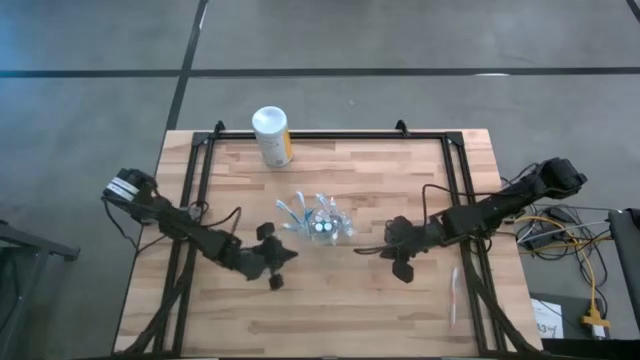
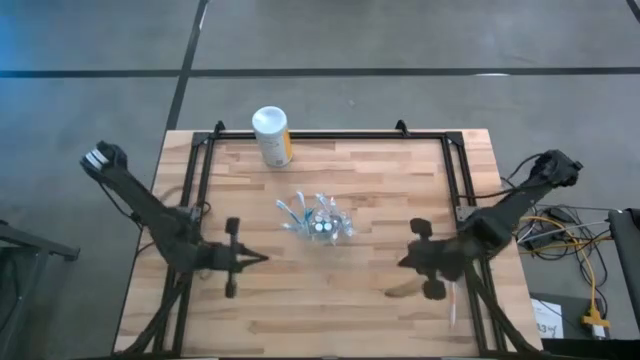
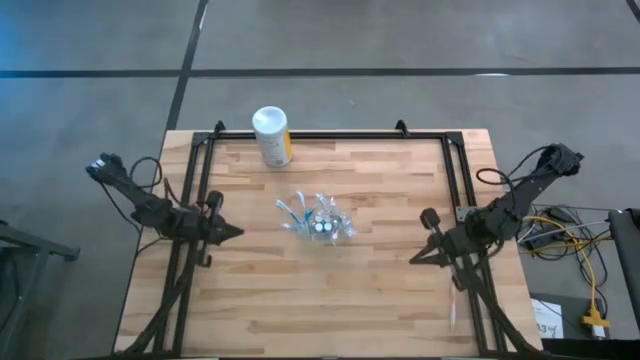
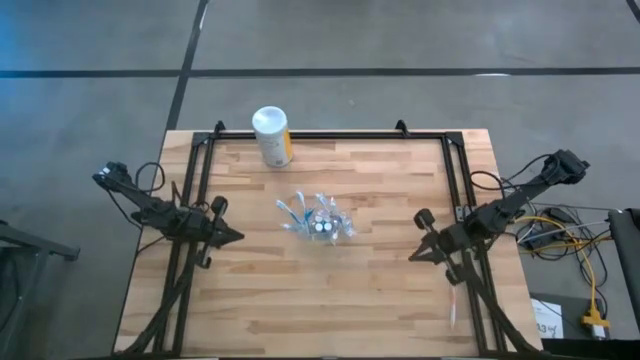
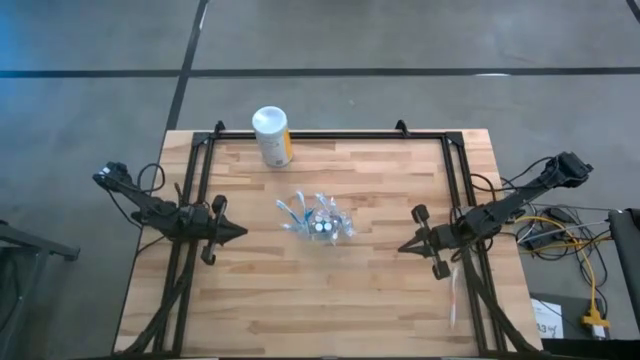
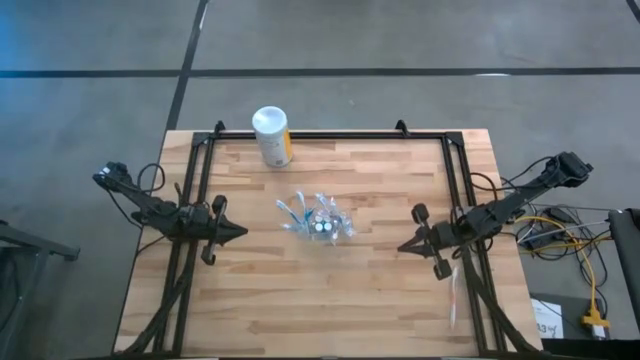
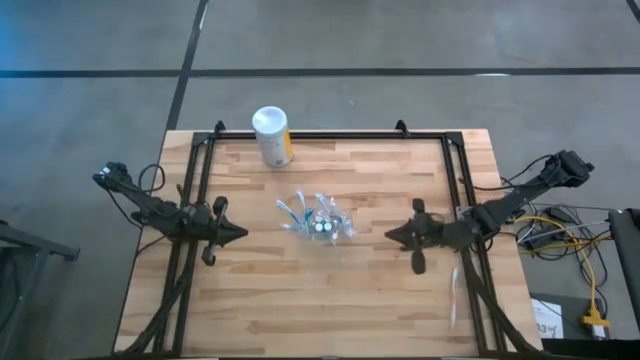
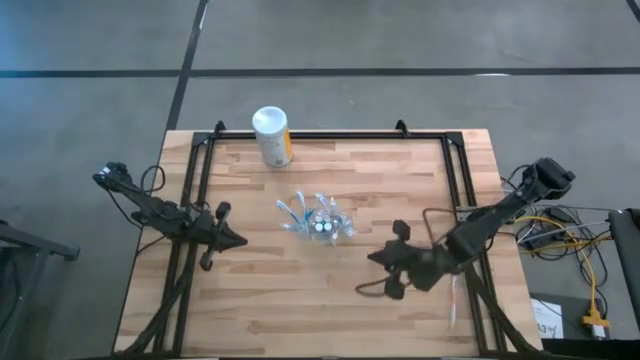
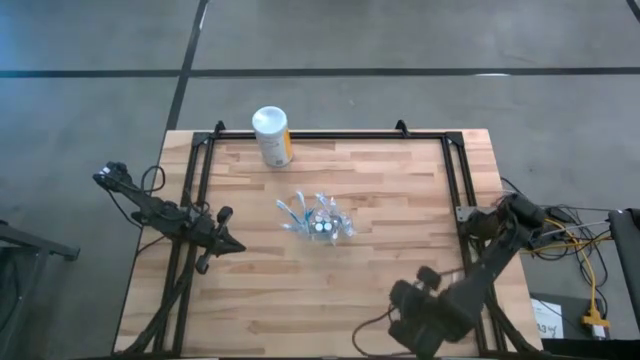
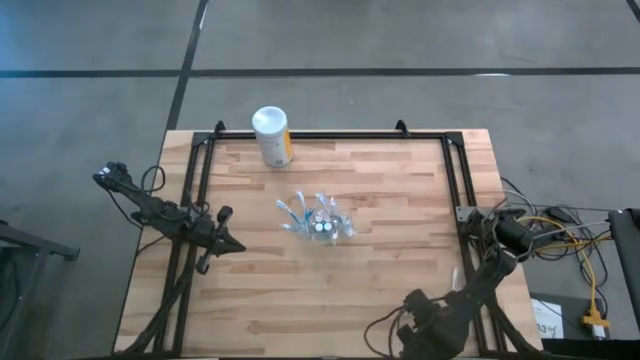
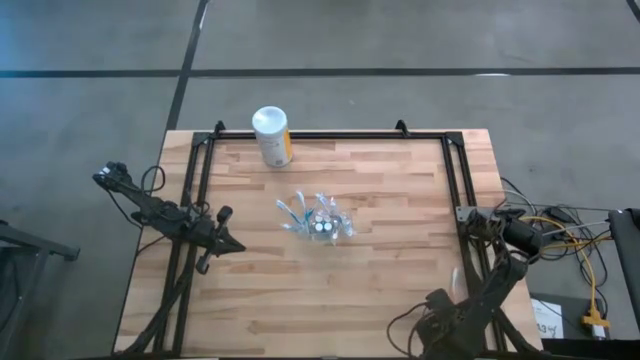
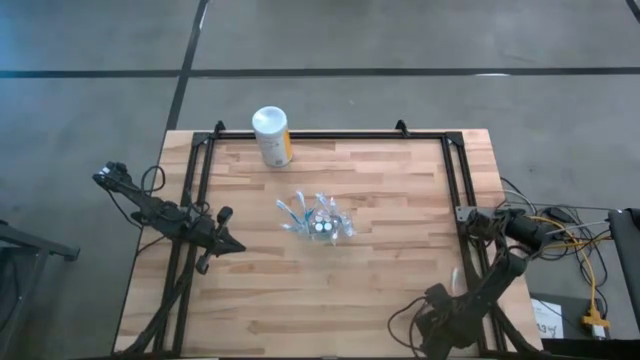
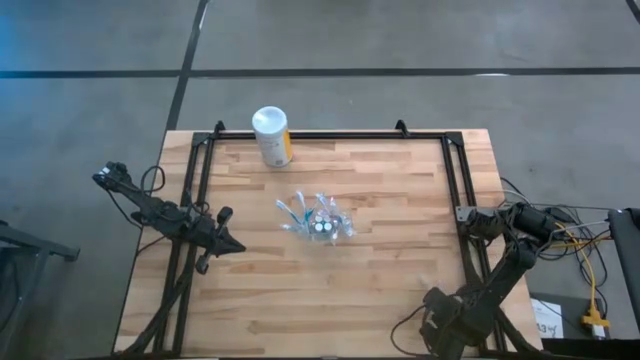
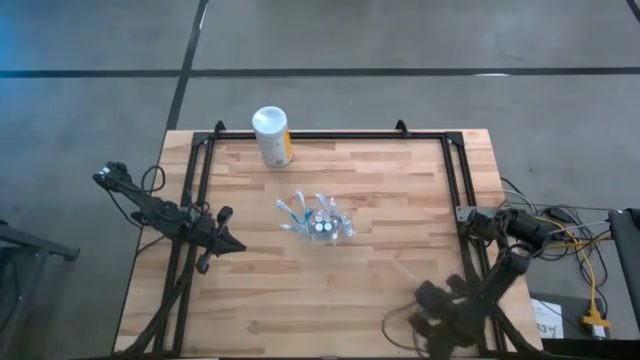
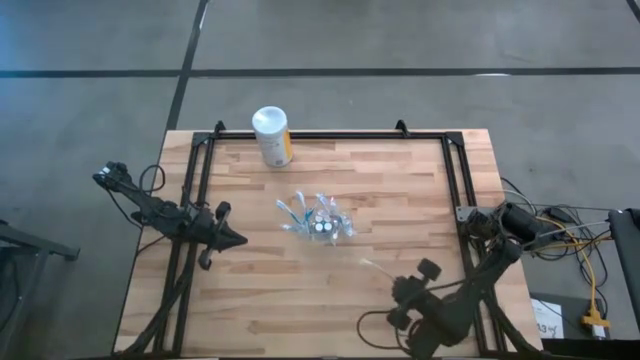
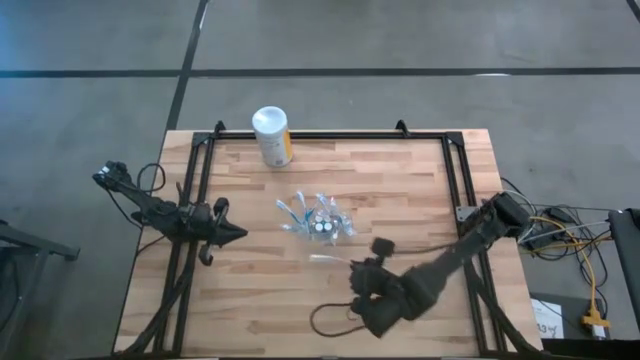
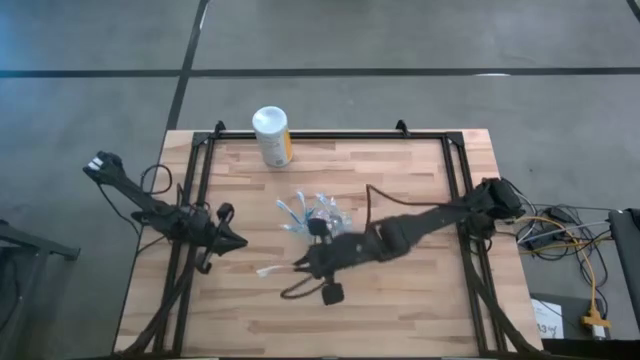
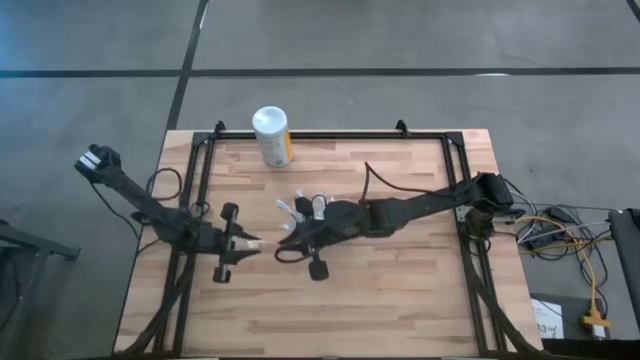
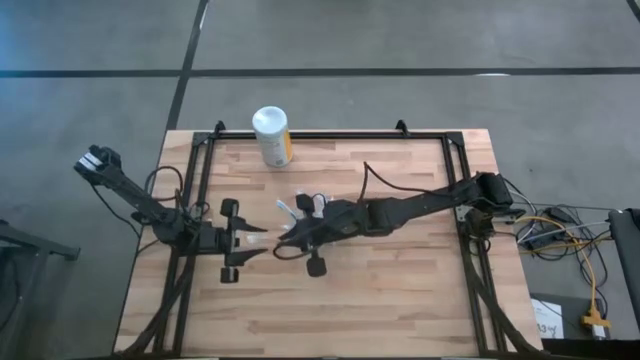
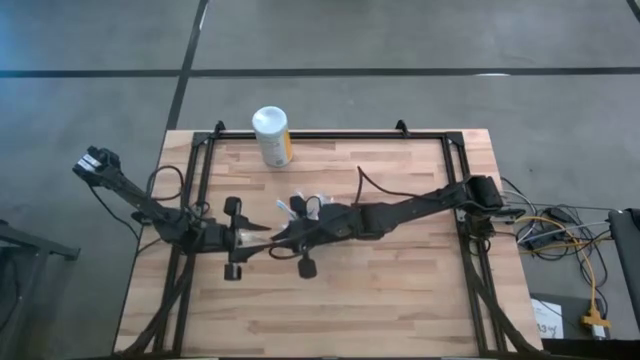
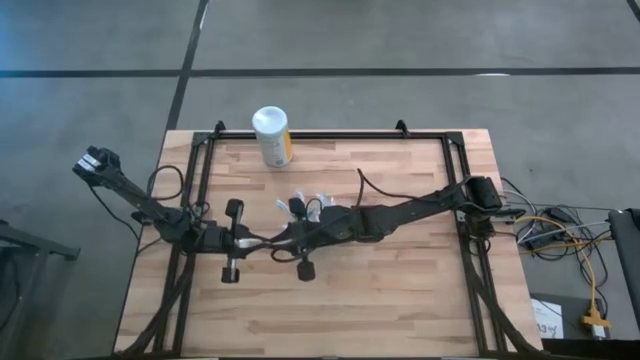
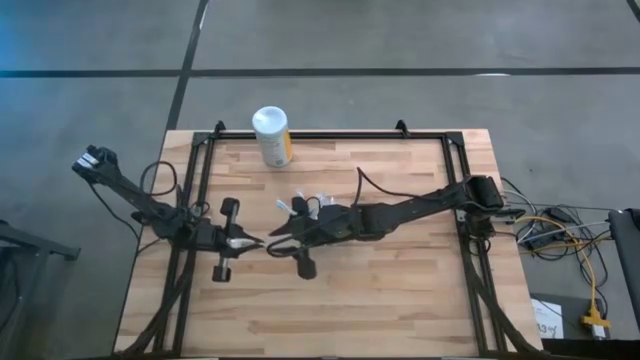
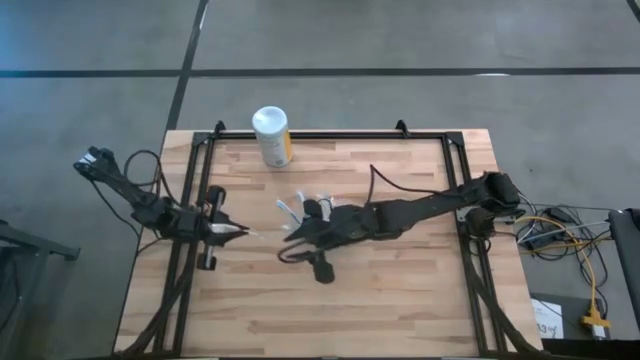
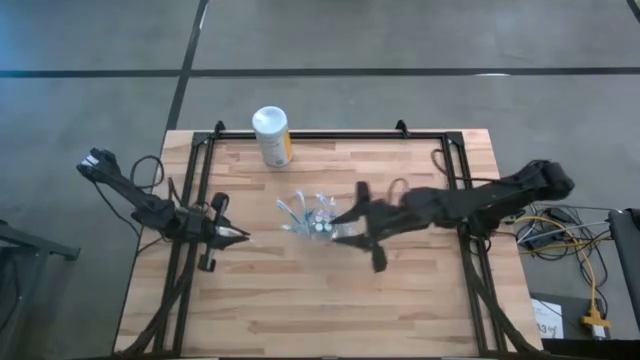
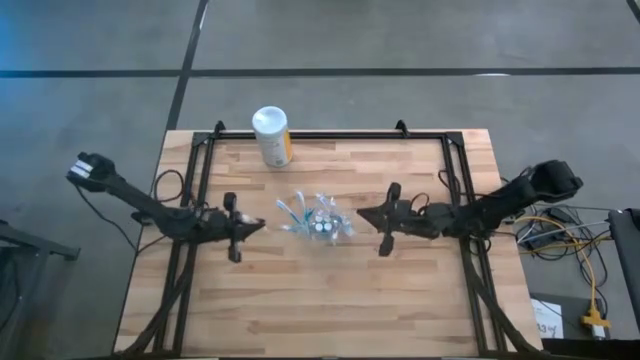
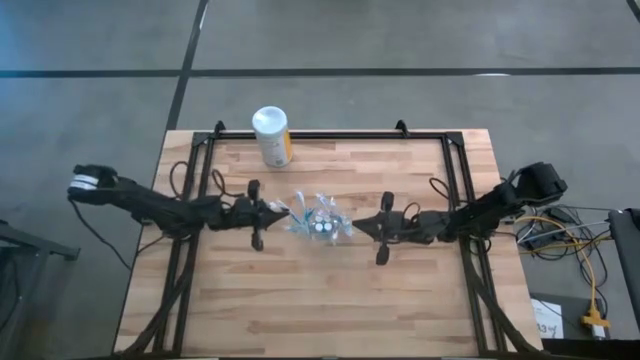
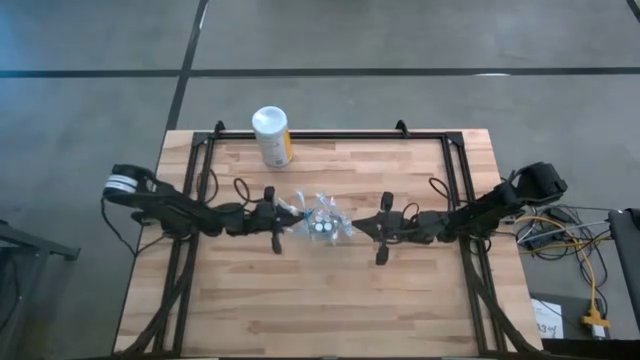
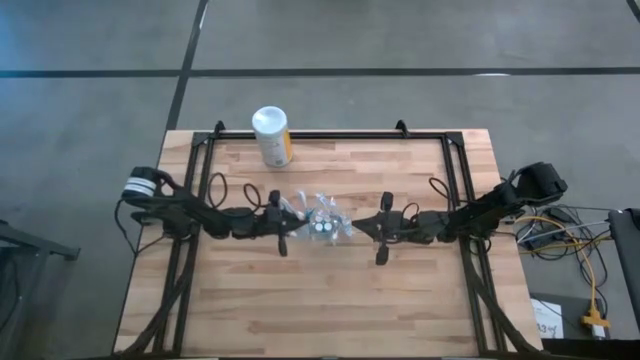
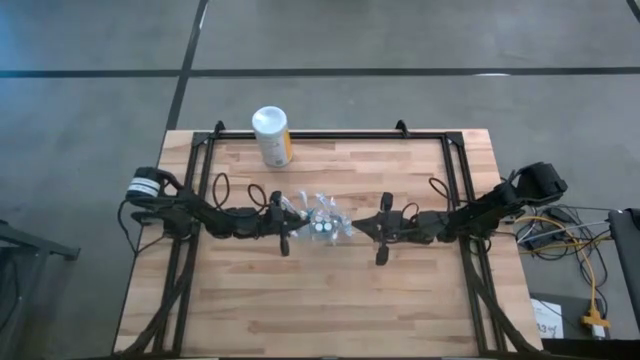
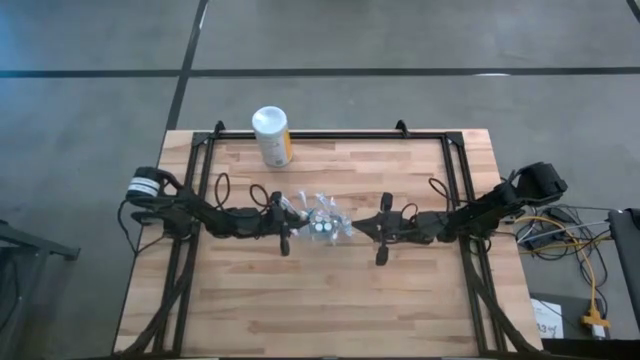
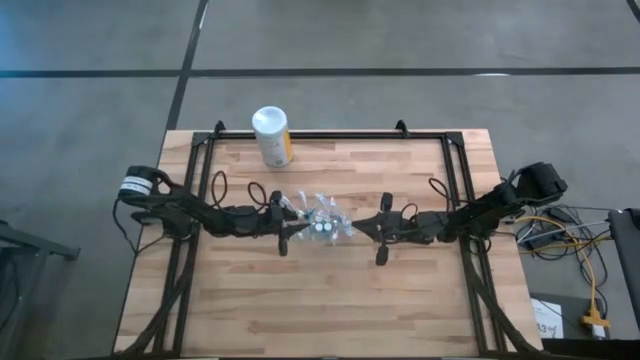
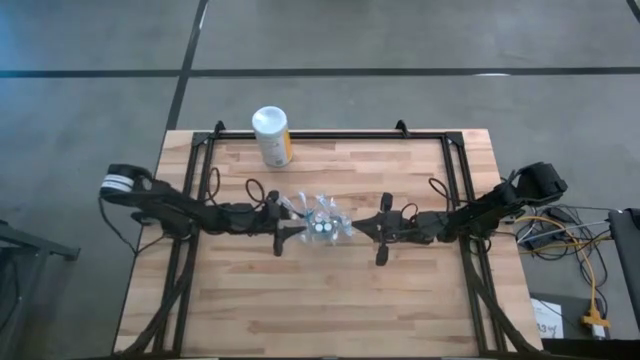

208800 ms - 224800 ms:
Task: Pick & Place toothbrushing station
Put the orange toothbrush into the transparent organizer

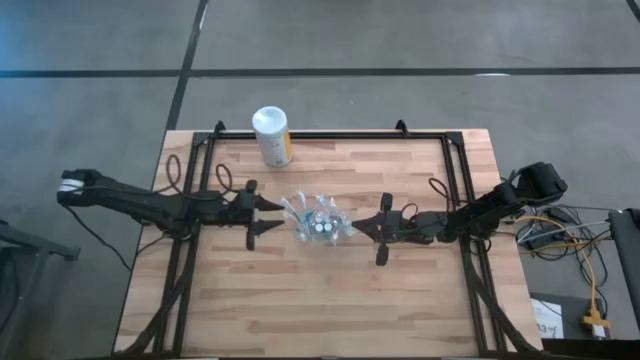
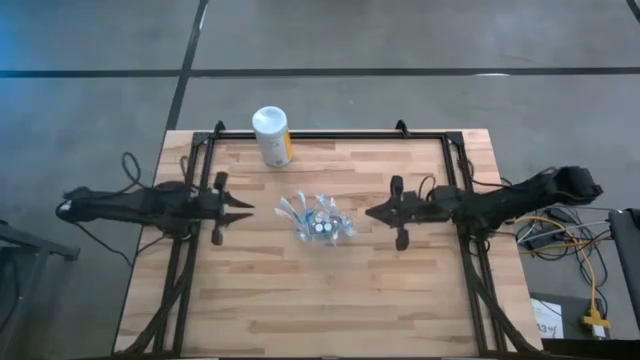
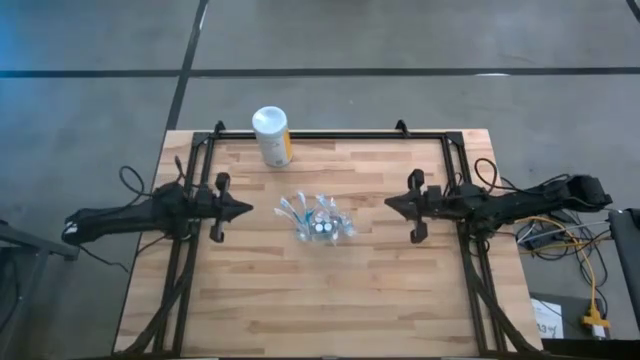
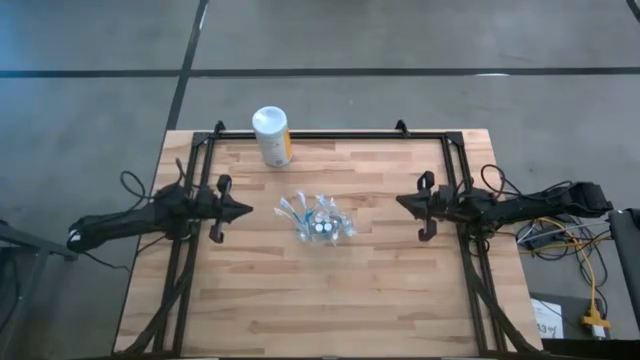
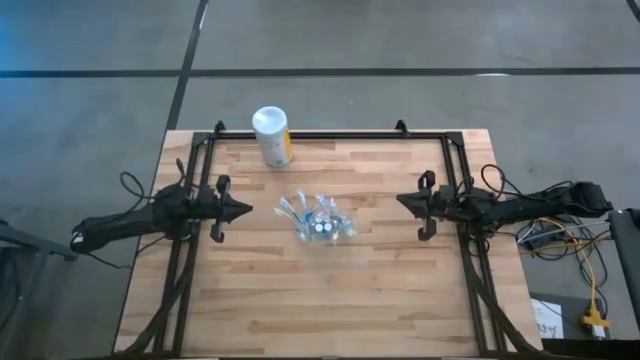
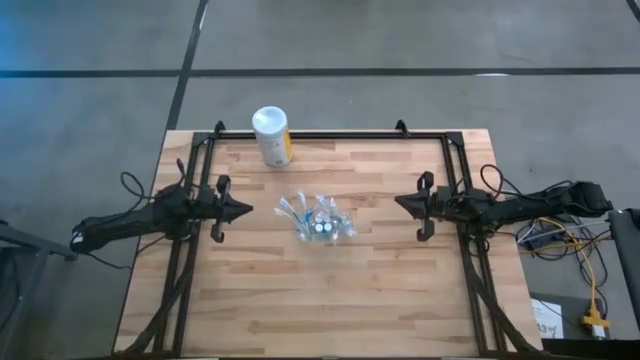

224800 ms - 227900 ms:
Return to Home Position

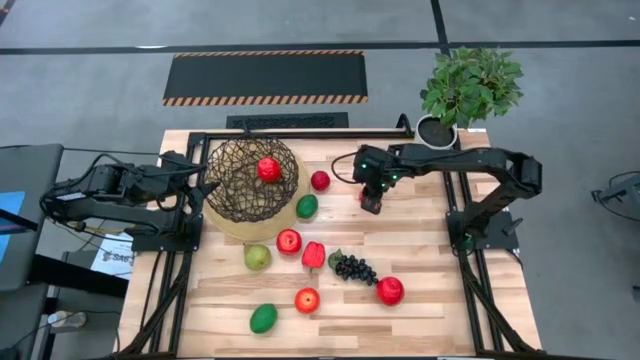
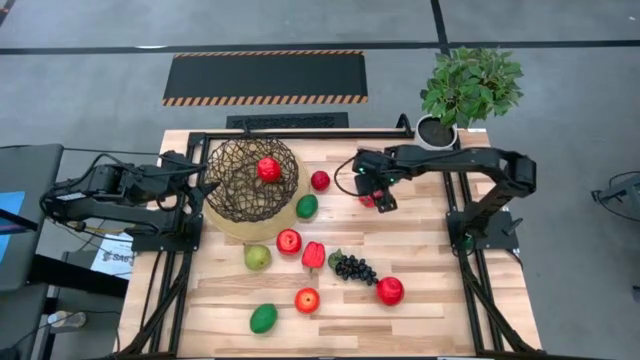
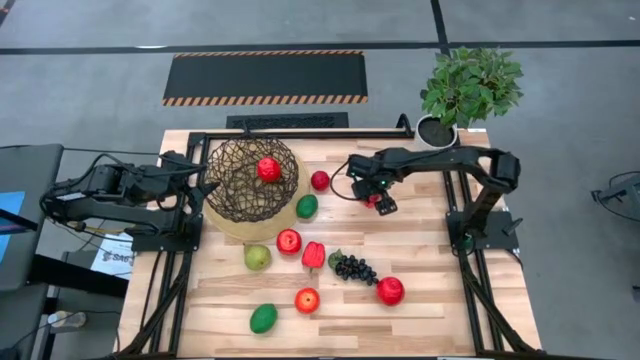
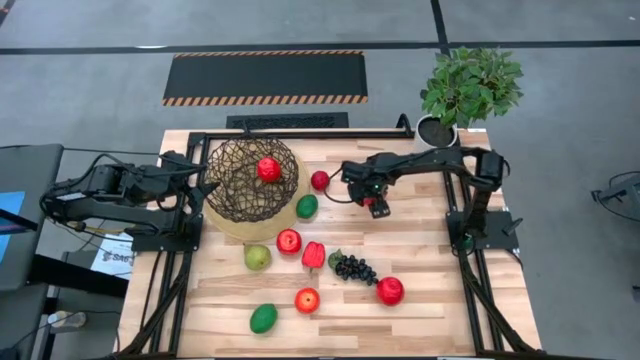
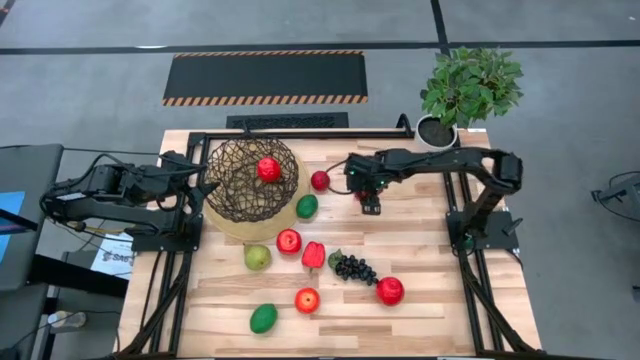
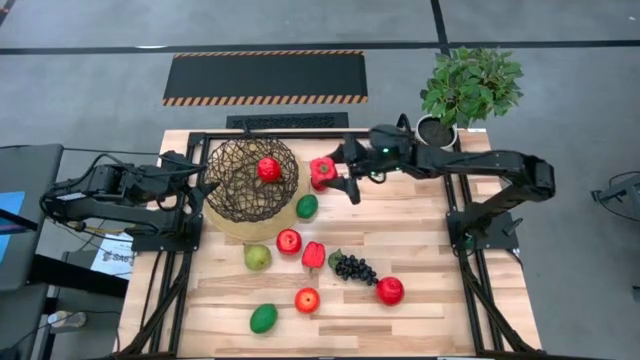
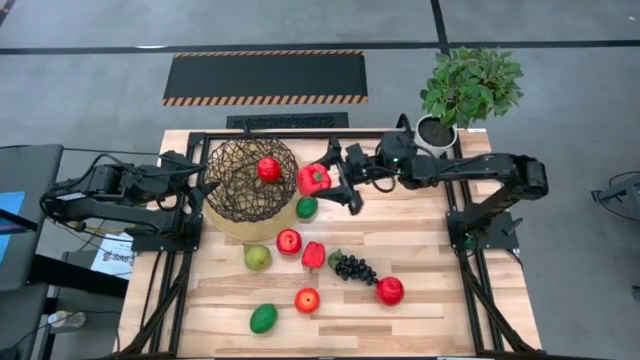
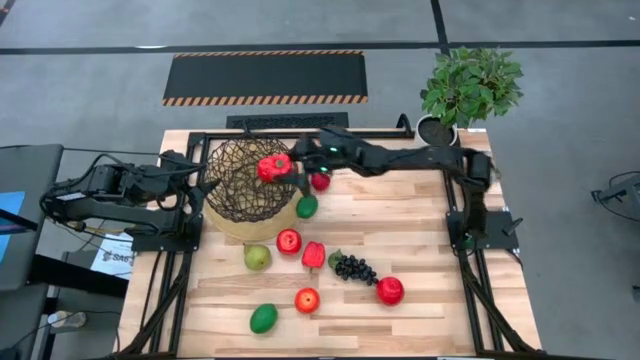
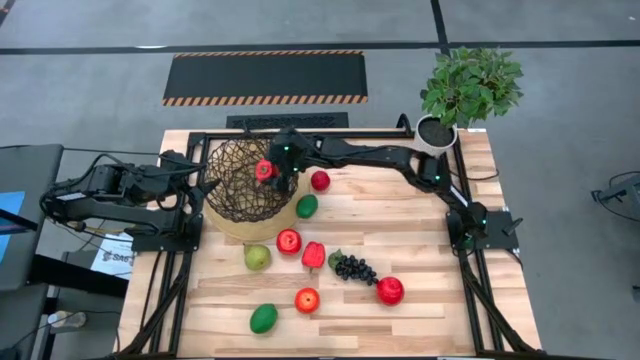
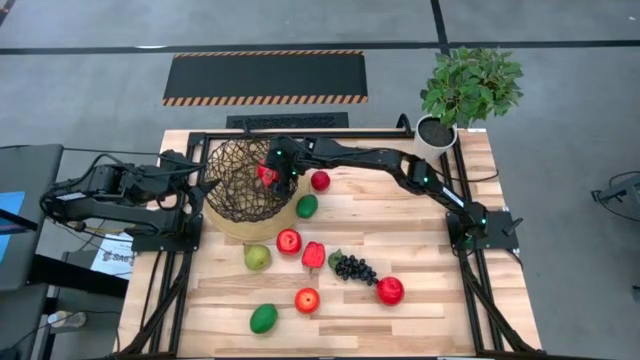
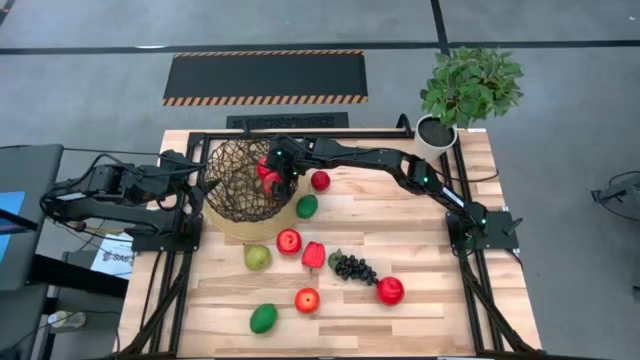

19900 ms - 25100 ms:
Task: Build produce basket
Put the red bell pepper into the black wire basket
